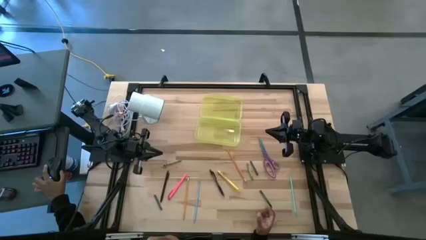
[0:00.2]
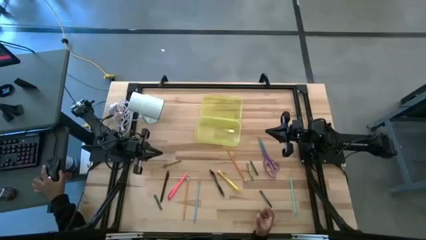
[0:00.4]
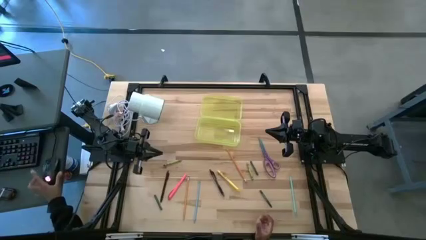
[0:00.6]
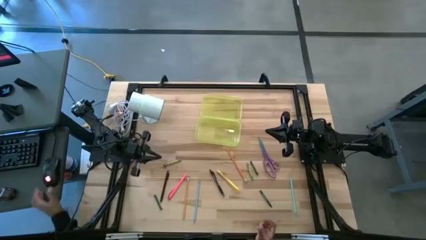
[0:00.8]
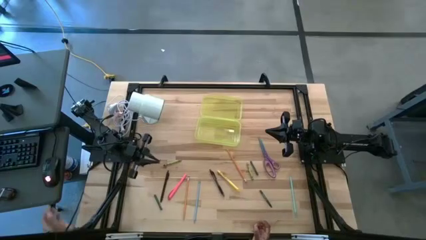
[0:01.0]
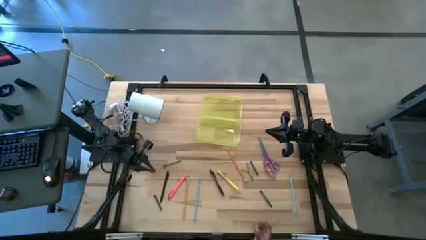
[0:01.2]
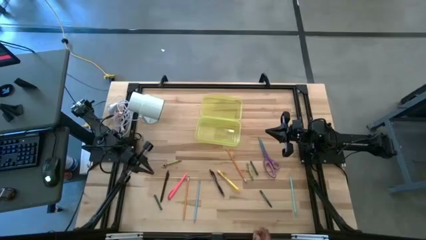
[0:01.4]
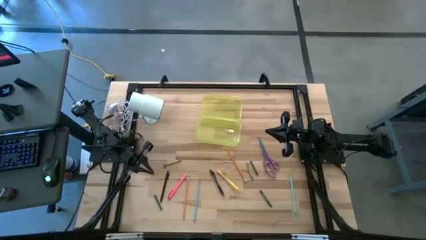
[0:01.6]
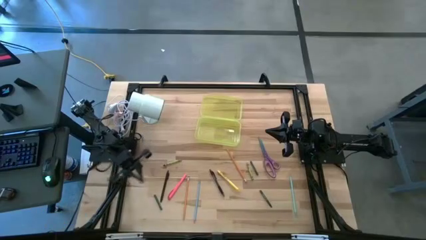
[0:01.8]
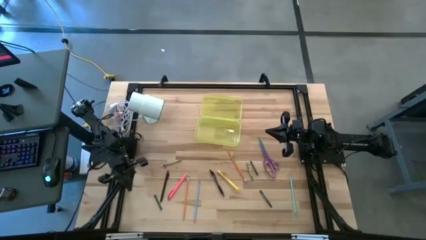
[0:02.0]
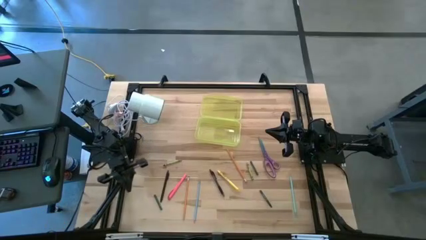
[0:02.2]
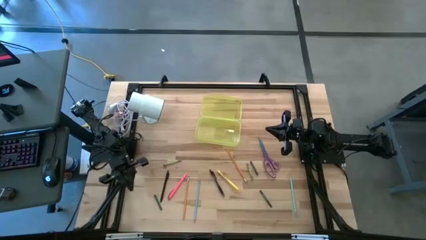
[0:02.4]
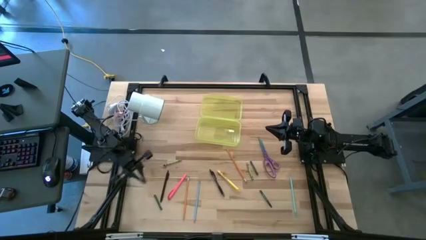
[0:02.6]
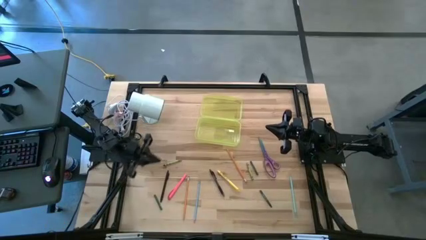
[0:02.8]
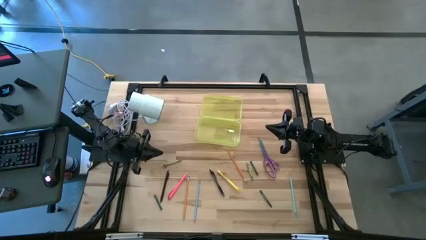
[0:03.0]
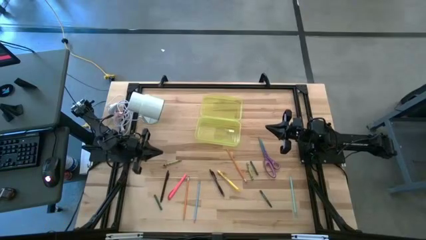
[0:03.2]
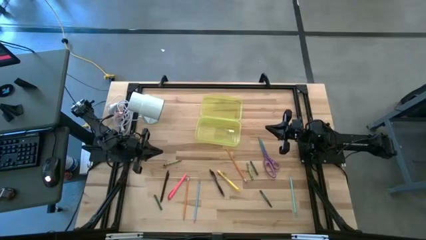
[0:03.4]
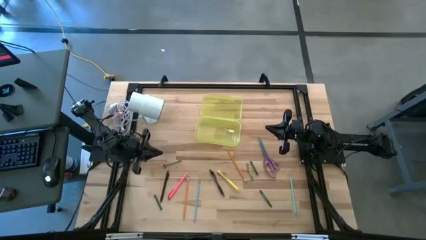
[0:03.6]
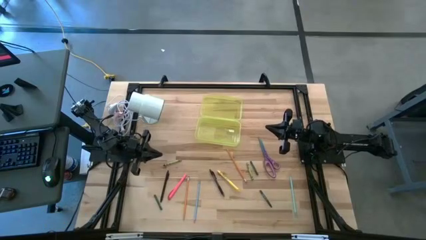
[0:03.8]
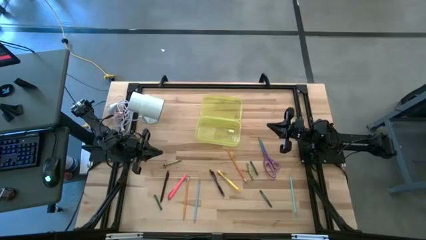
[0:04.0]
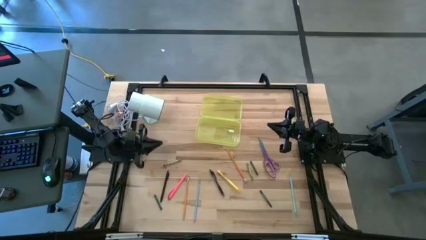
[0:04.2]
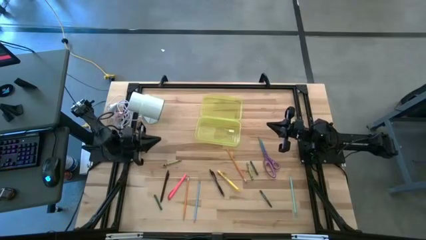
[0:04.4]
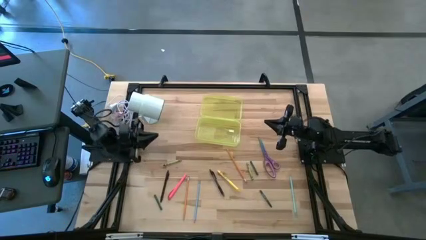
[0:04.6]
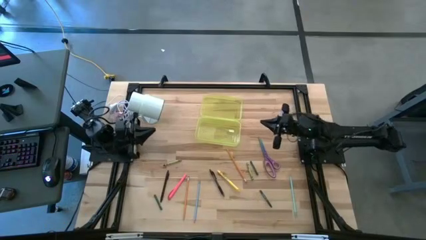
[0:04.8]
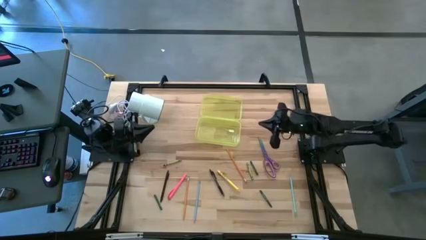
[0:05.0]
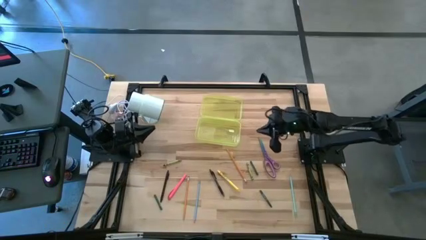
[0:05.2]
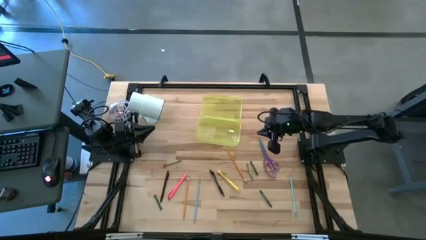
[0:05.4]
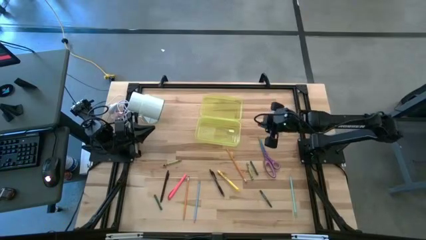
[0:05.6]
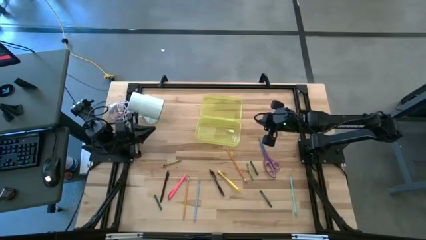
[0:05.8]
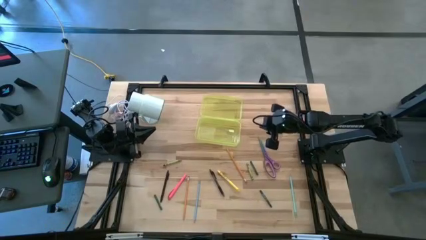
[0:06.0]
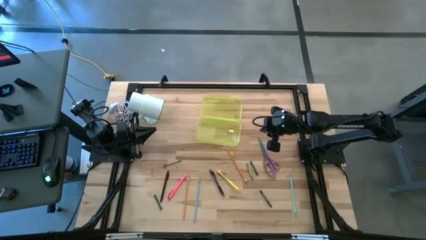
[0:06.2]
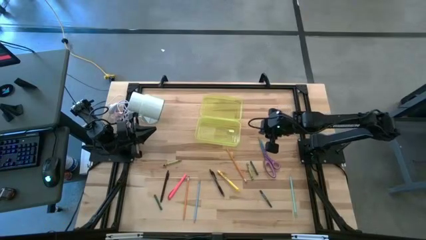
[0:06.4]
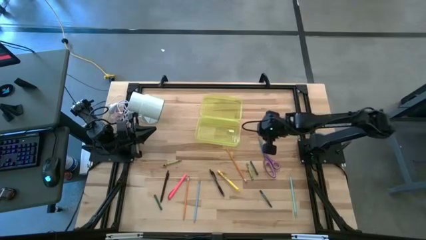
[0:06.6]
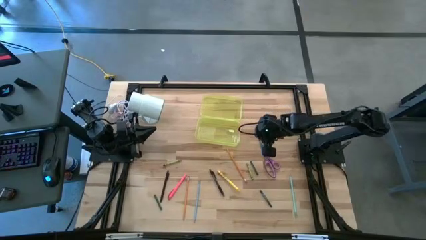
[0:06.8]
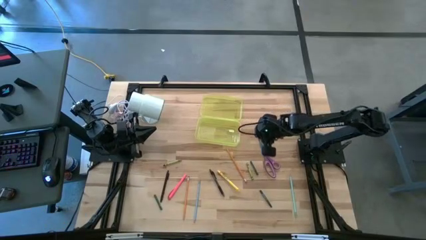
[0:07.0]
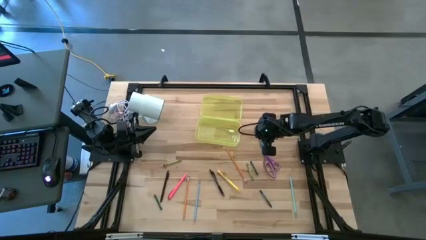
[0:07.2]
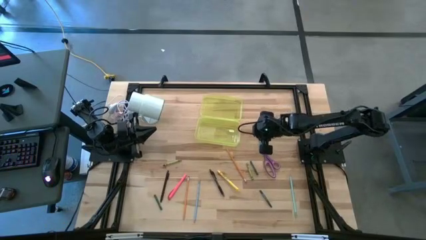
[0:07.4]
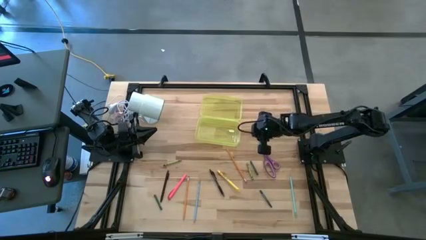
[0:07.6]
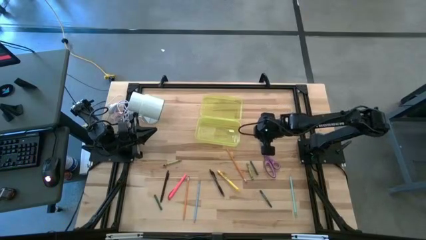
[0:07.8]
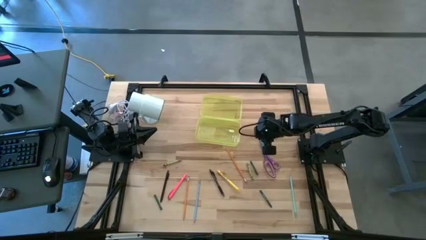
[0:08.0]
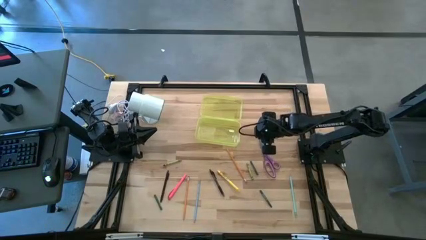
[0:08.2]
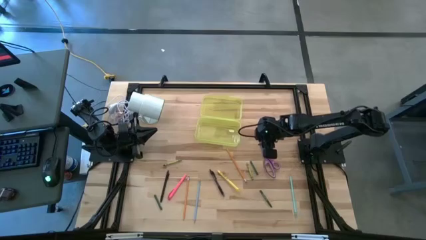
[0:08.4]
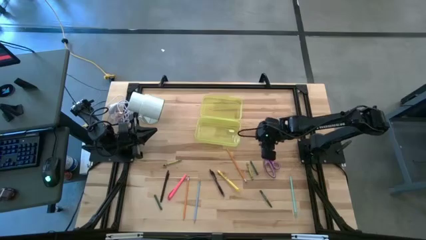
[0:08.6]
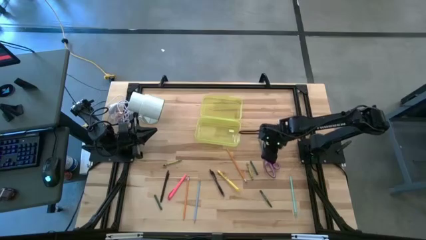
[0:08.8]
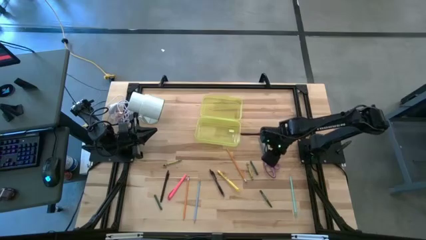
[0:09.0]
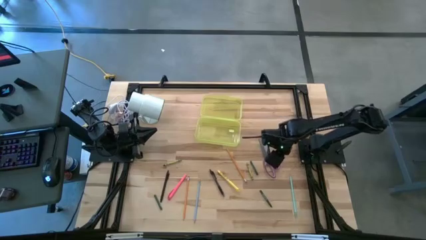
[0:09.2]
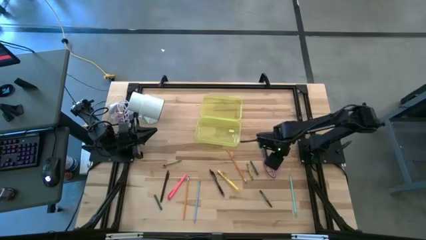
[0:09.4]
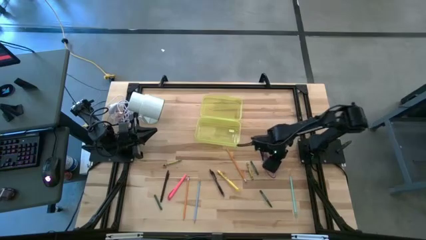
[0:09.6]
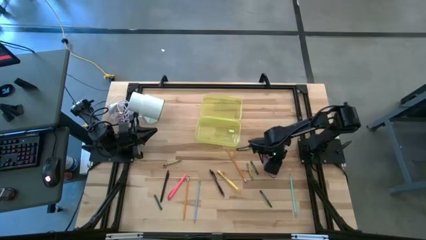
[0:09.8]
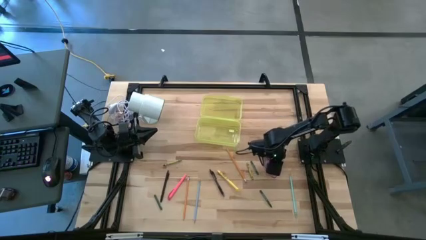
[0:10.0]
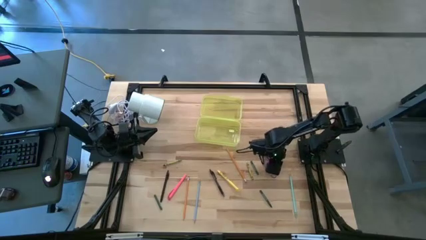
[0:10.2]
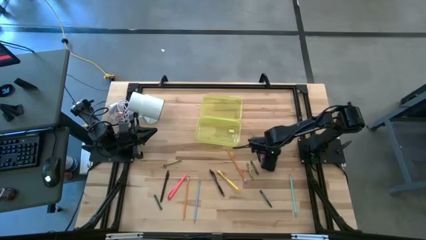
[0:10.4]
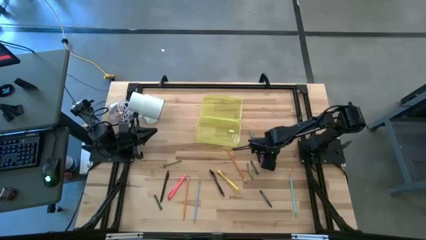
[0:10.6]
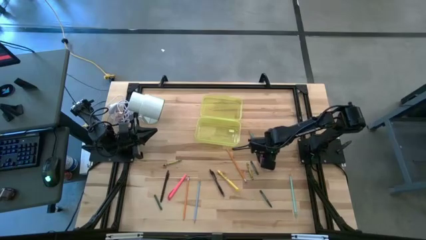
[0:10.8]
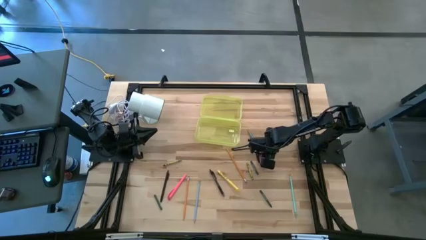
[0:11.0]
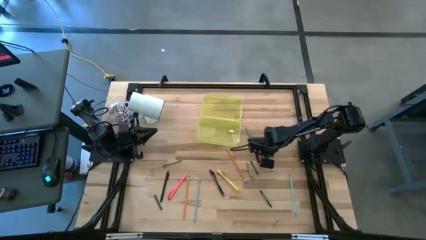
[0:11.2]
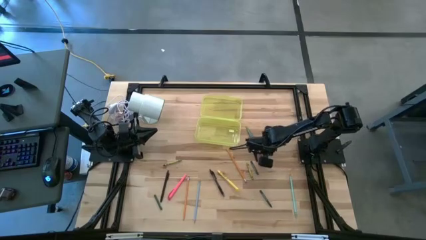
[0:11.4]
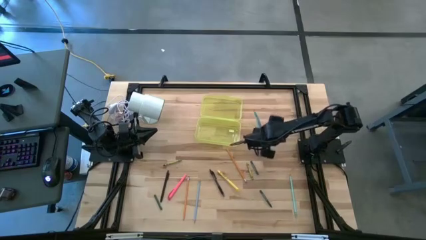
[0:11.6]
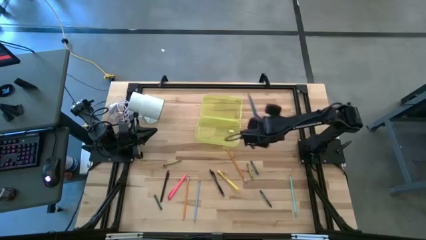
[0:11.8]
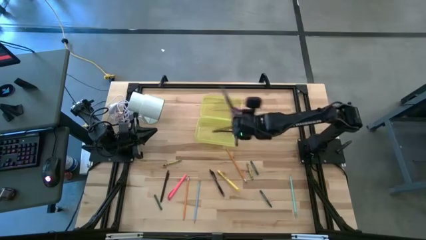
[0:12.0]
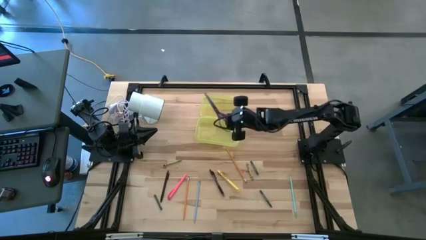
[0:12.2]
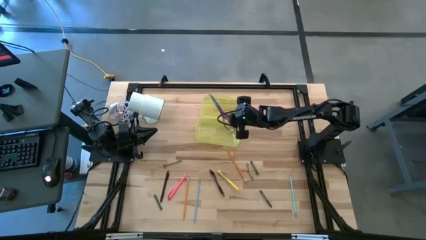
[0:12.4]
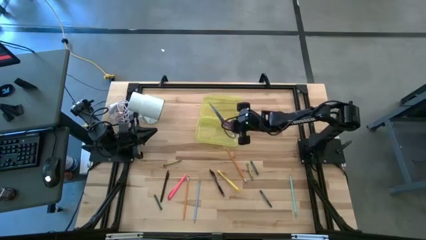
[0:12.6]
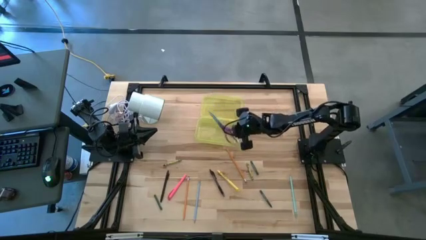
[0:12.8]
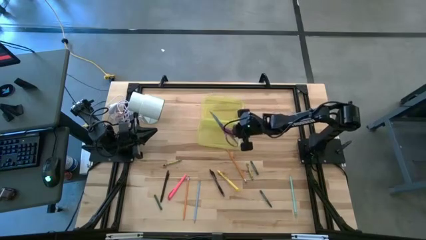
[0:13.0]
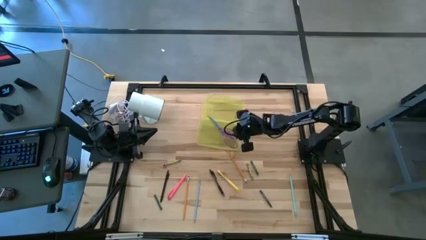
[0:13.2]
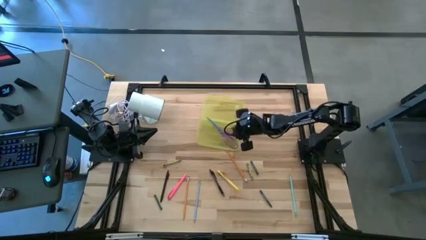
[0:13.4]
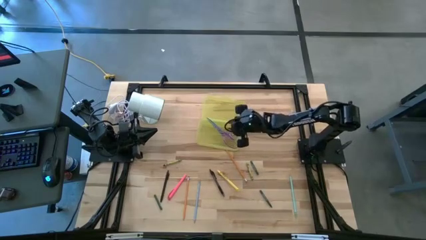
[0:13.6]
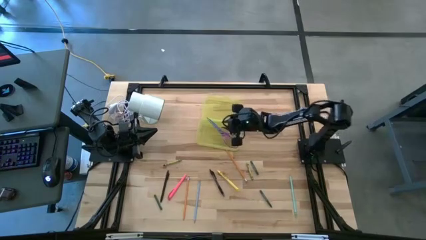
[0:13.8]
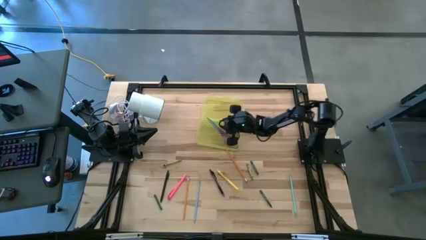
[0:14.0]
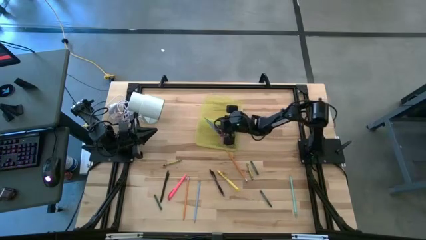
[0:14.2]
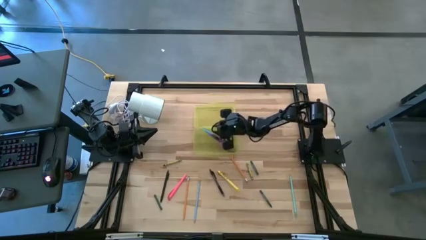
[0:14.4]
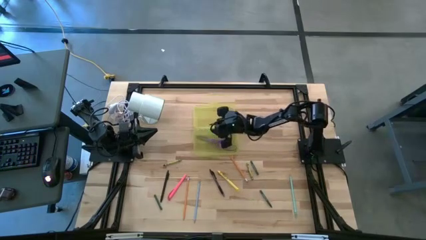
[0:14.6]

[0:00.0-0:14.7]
Task: Pick & place school supplies into a supply box
Put the scissors into the supply box

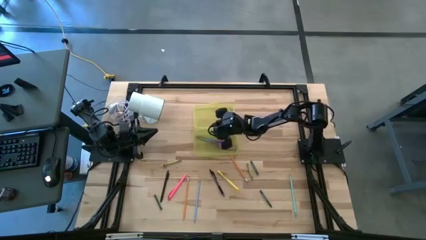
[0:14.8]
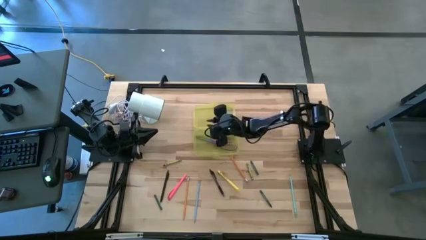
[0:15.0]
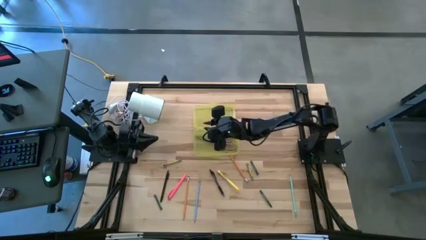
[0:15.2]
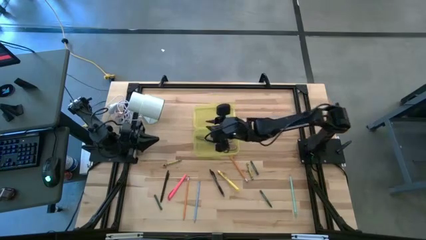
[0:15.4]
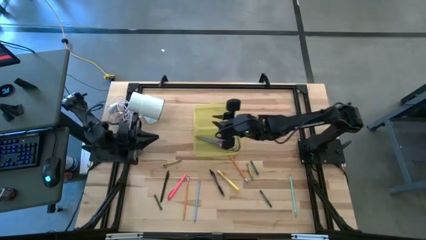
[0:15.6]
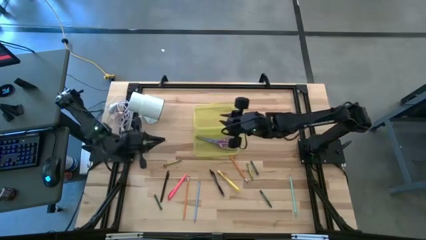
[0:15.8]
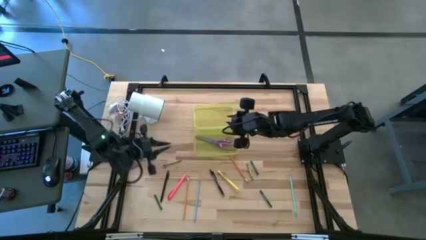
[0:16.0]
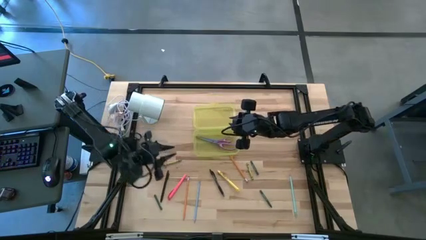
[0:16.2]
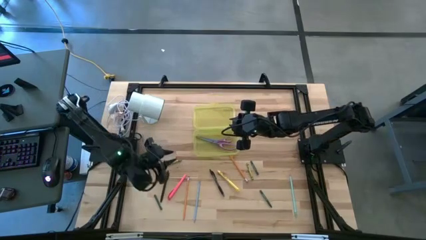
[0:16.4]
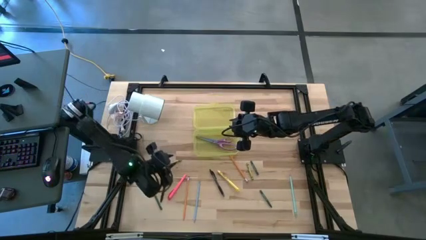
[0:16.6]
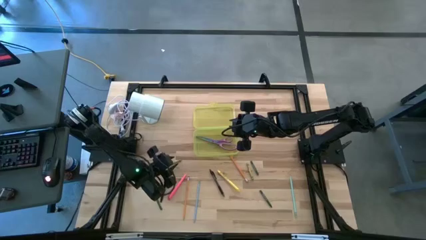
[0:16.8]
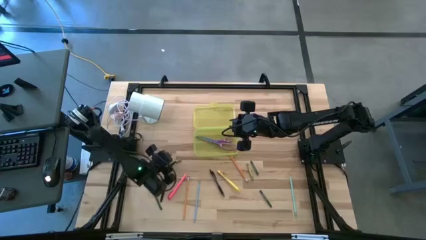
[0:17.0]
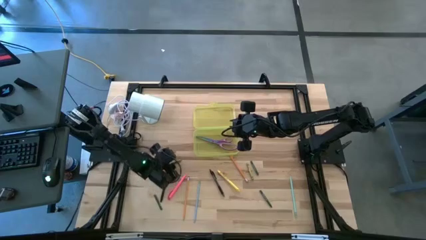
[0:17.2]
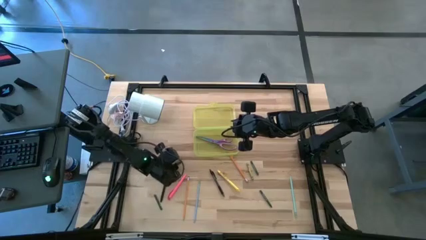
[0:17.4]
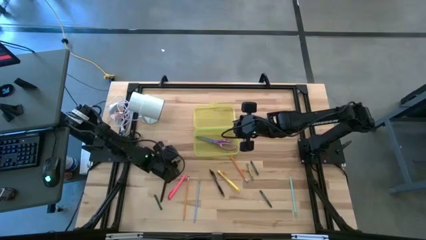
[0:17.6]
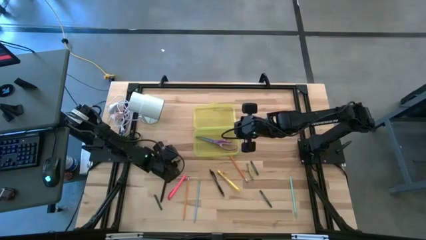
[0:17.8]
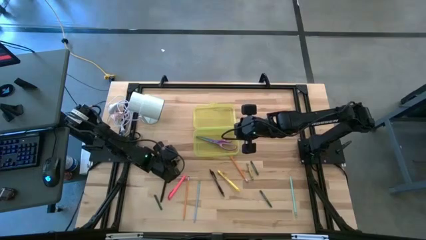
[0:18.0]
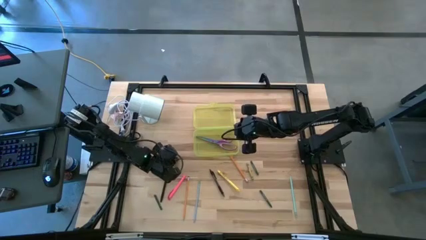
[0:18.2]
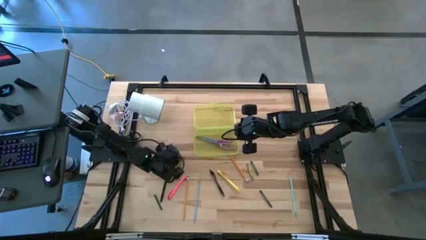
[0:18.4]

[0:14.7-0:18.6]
Put the green crayon into the supply box
